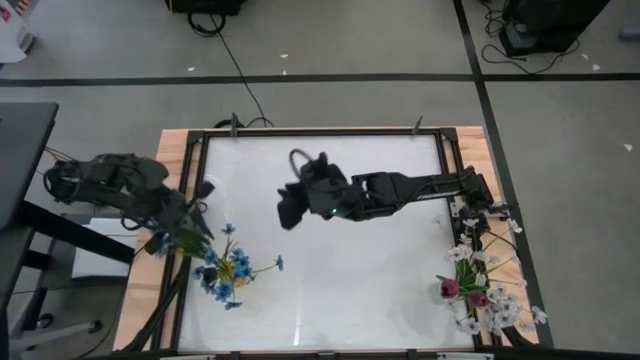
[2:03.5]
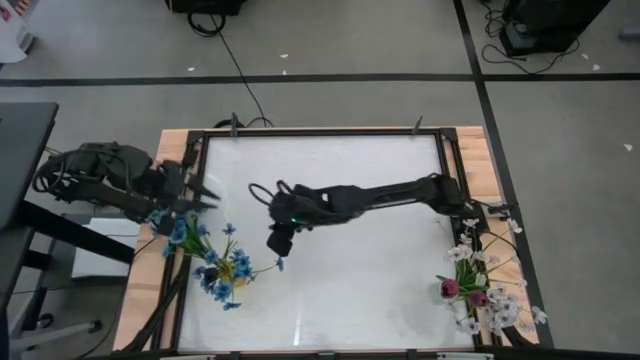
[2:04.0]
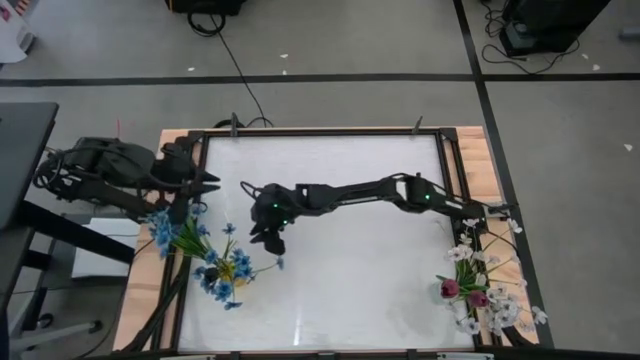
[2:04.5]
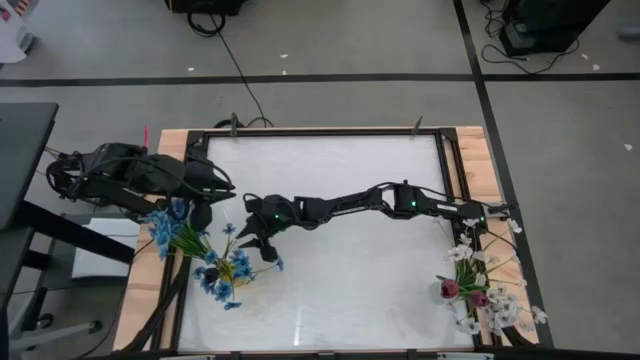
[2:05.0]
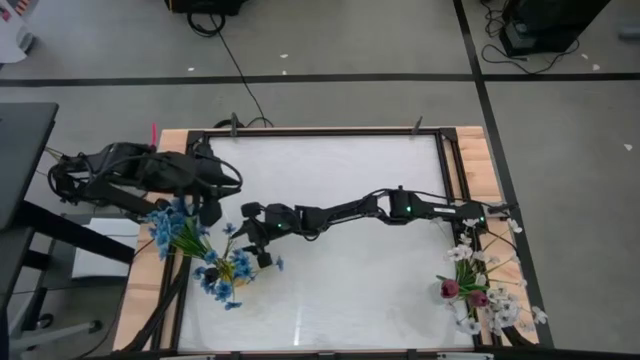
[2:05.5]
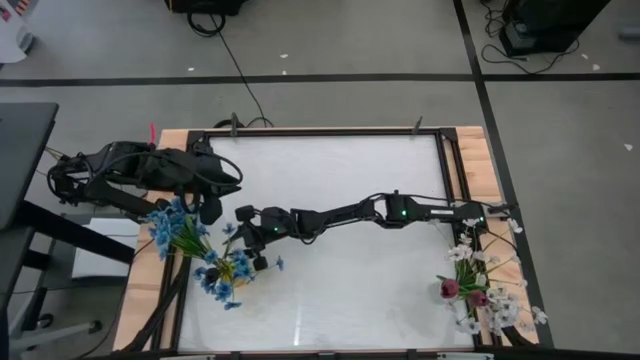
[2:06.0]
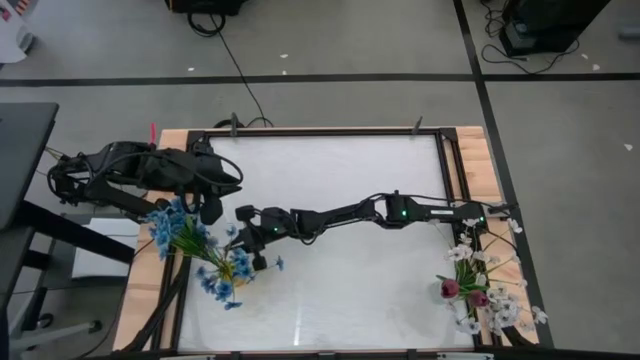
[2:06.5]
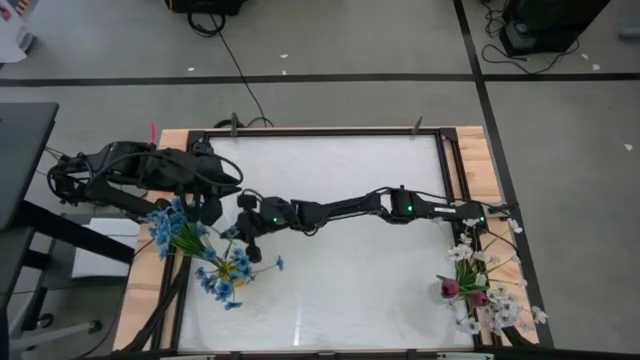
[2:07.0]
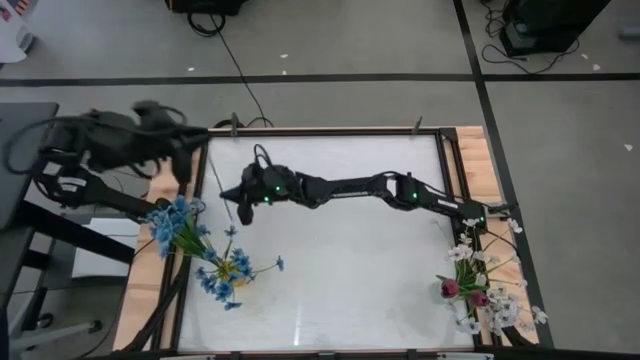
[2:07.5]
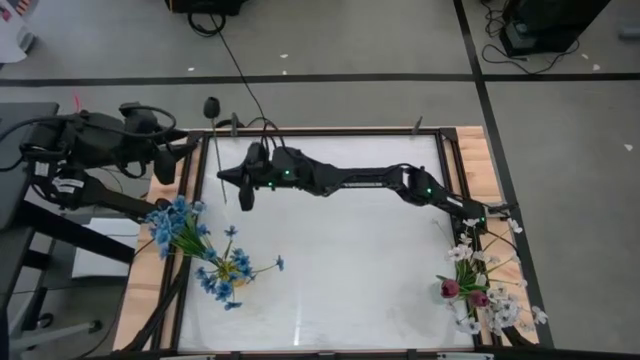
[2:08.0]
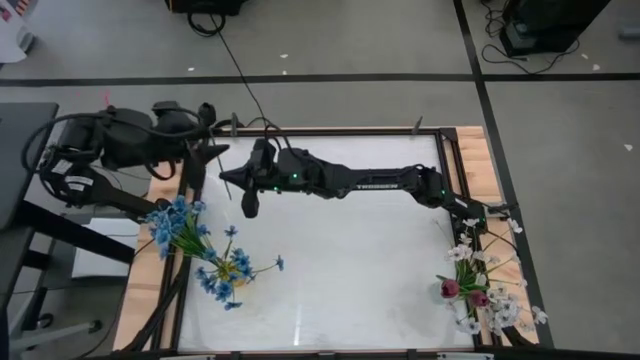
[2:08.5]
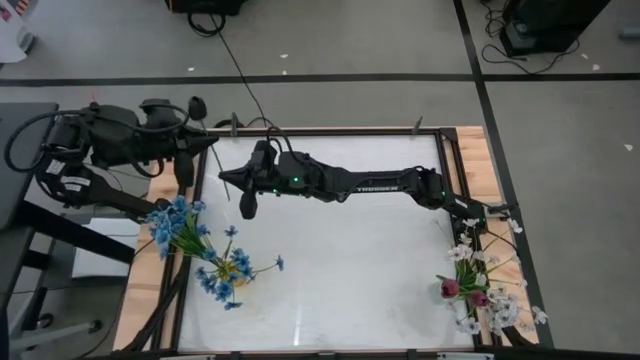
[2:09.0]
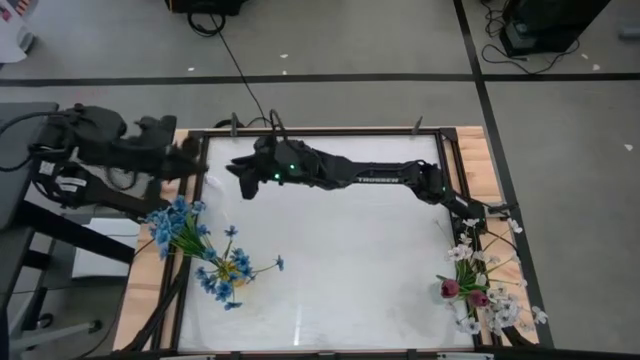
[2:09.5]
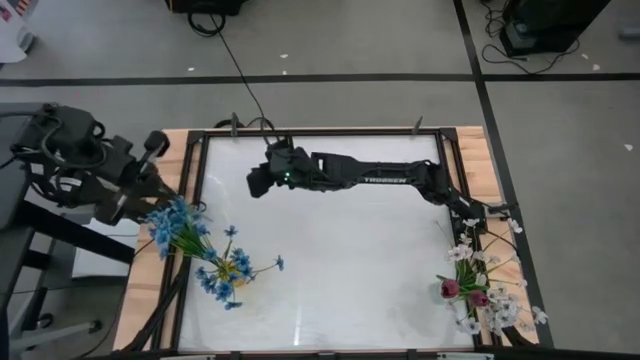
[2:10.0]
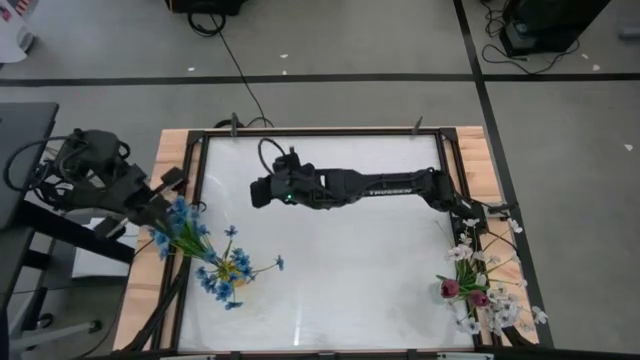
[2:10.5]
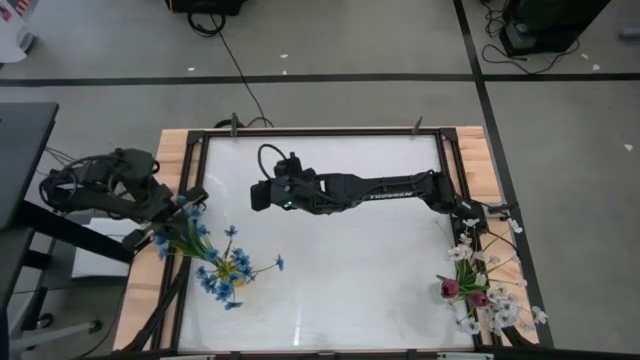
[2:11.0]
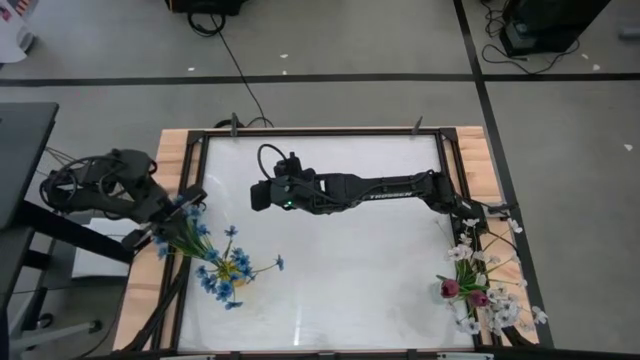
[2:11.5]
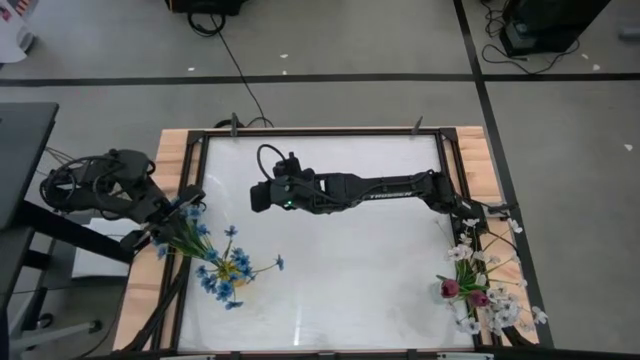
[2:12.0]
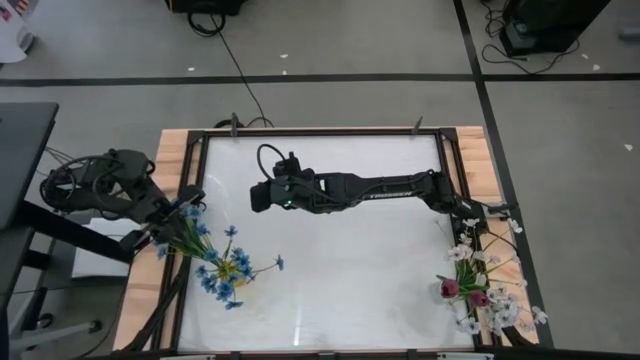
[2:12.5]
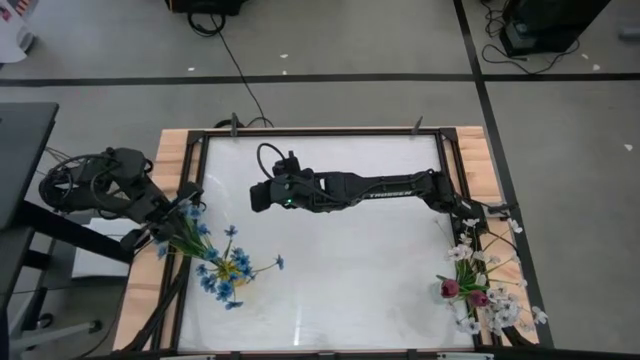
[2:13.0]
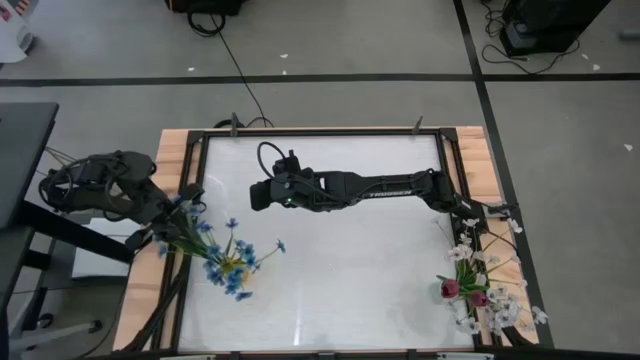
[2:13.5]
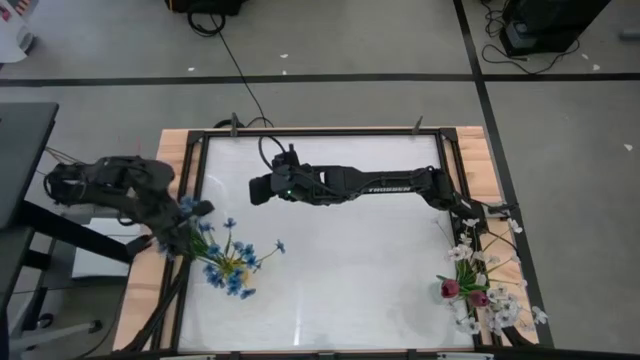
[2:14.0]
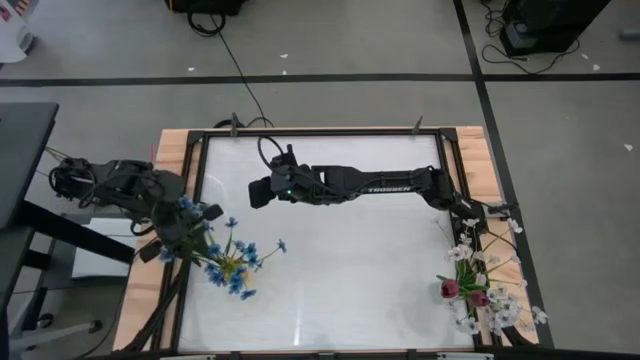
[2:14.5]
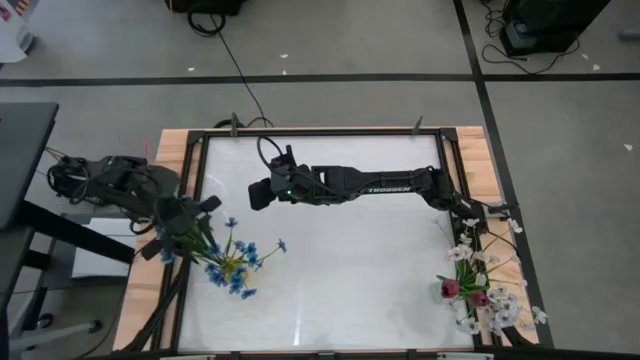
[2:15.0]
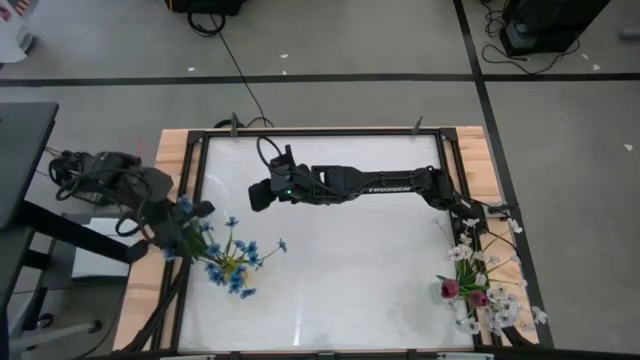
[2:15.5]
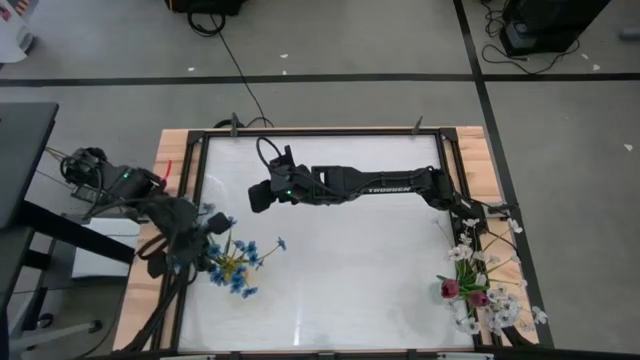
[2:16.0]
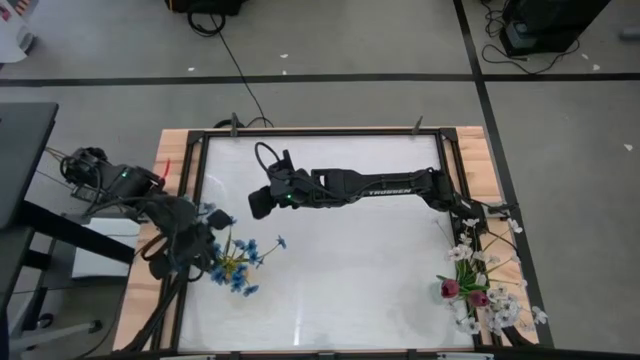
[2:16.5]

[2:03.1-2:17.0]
Task: Sort flowers into vase by color
Put the black tulip into the yellow vase

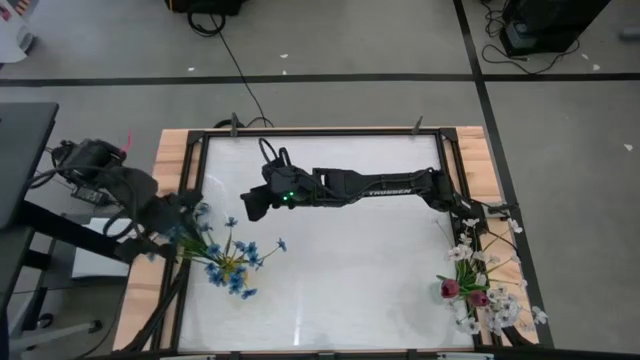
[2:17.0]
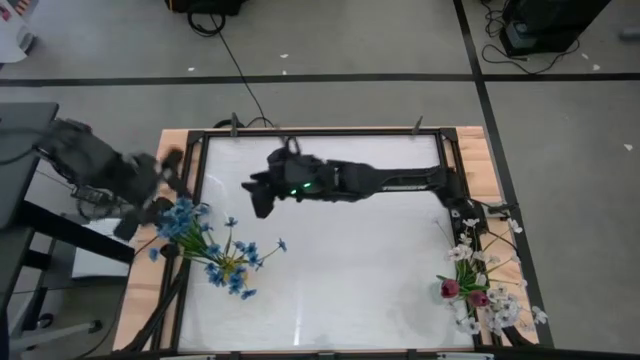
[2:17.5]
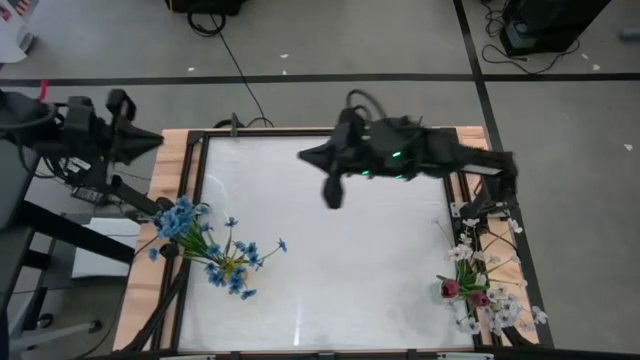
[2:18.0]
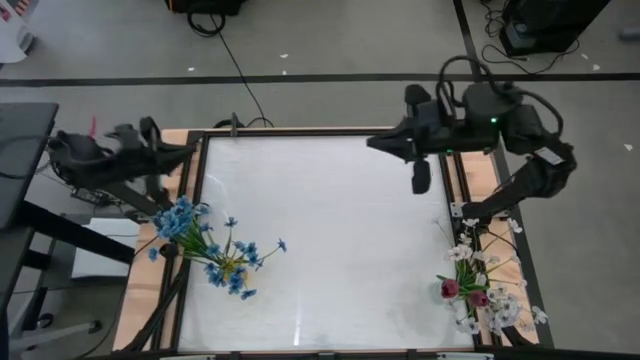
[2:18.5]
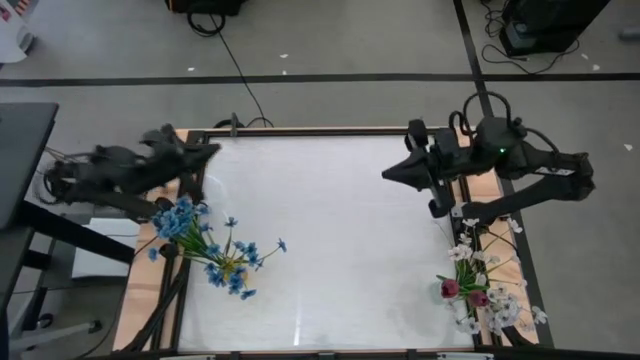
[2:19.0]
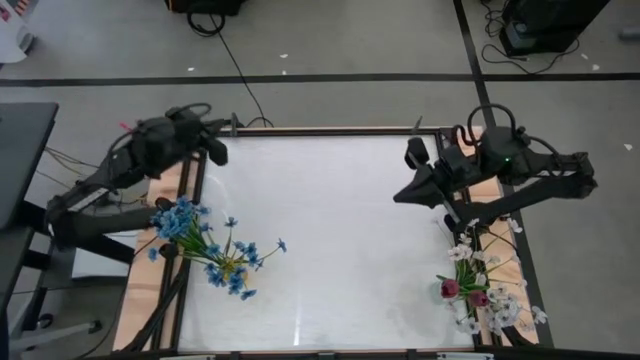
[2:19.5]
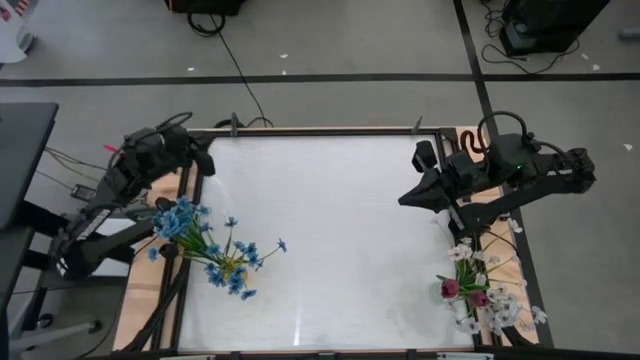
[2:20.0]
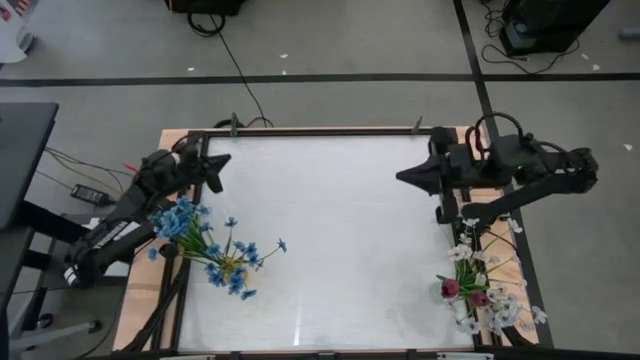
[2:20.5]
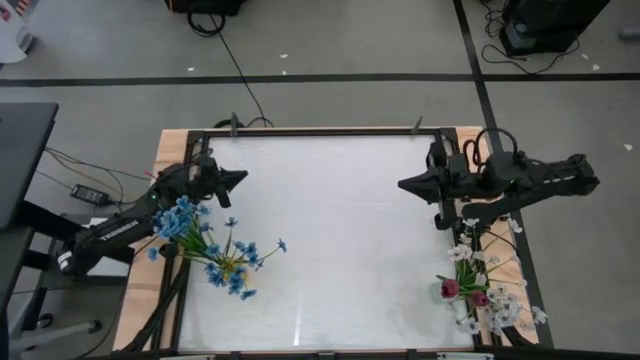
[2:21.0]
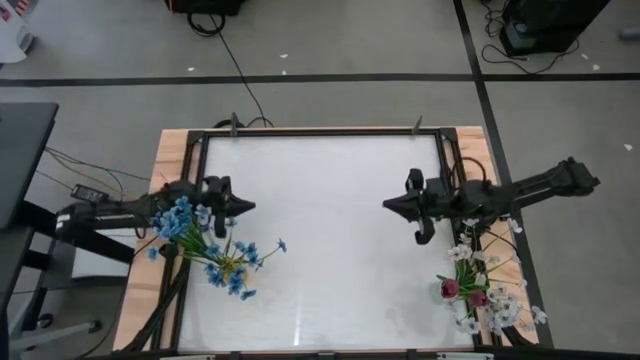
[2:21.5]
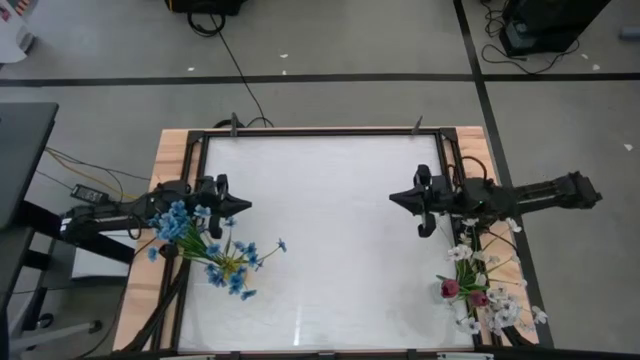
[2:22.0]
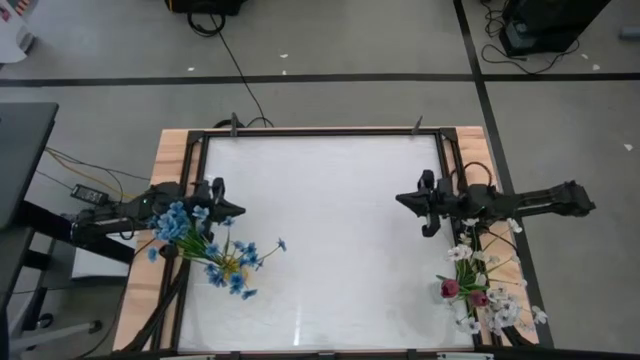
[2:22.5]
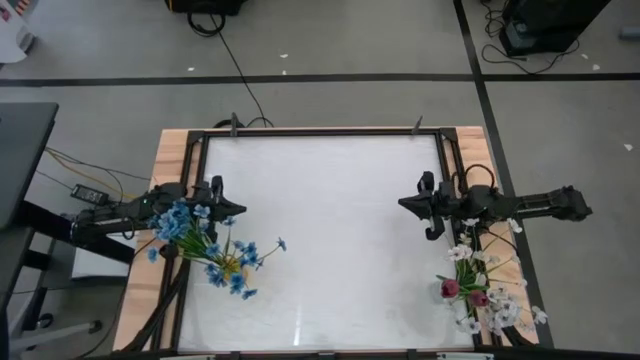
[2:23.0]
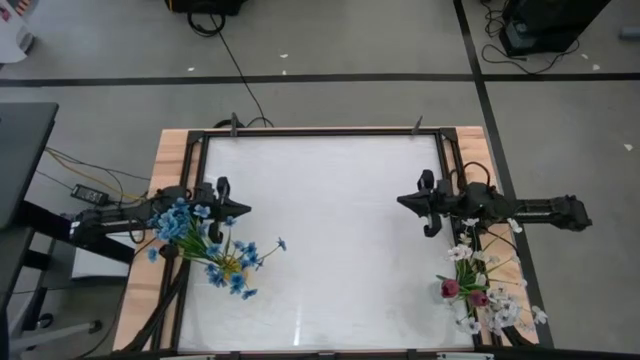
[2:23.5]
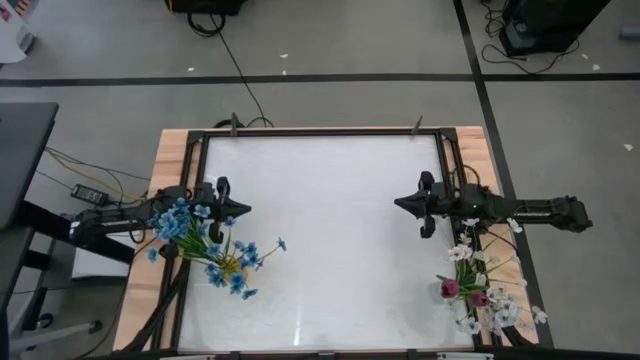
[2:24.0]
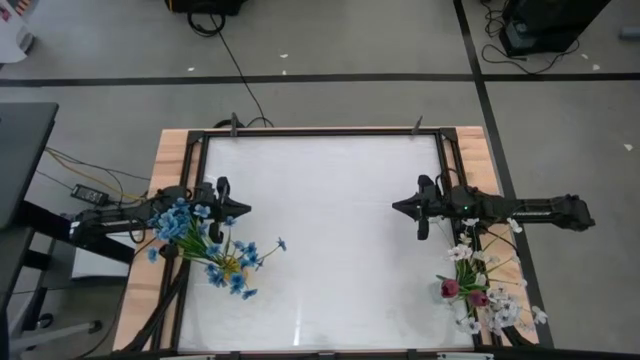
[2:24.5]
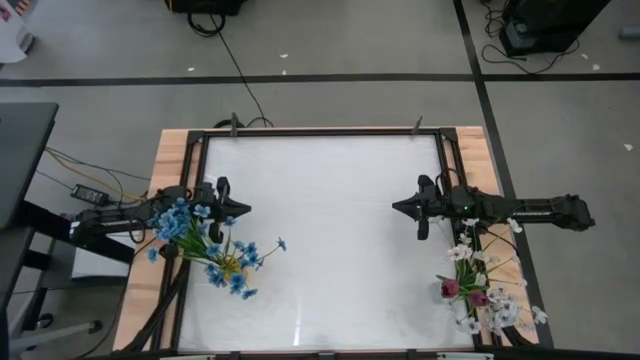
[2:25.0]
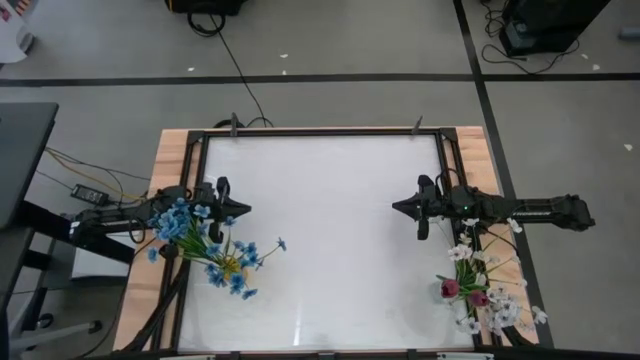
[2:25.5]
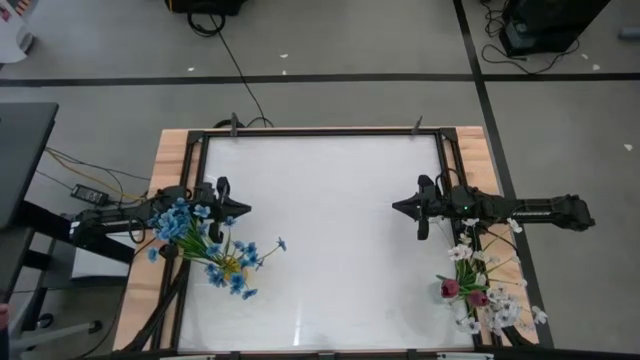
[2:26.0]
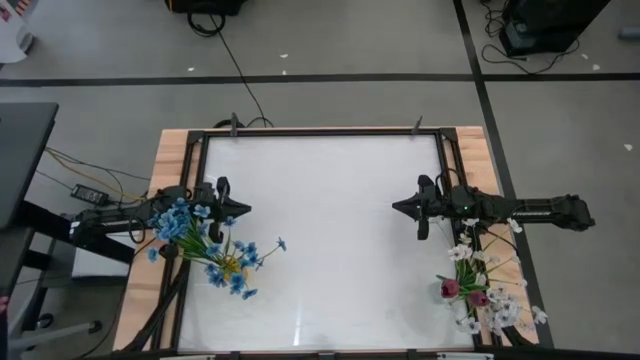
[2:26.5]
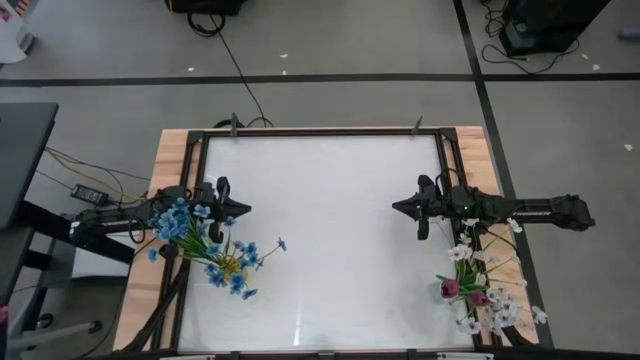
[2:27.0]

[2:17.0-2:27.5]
Return to Home Position
